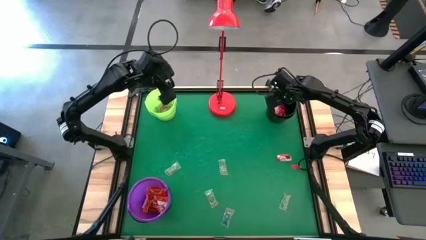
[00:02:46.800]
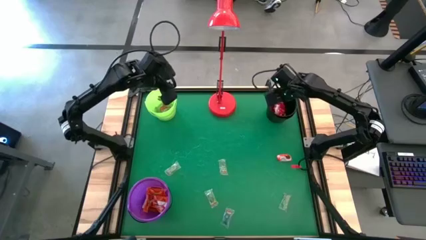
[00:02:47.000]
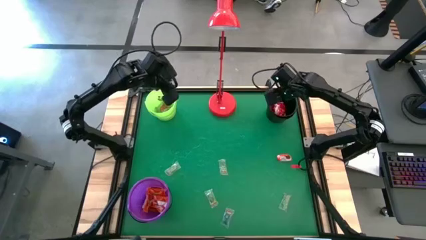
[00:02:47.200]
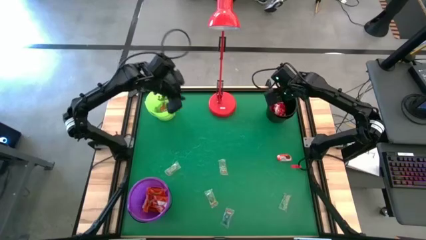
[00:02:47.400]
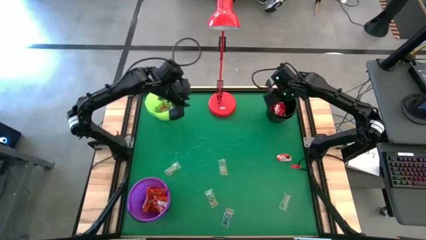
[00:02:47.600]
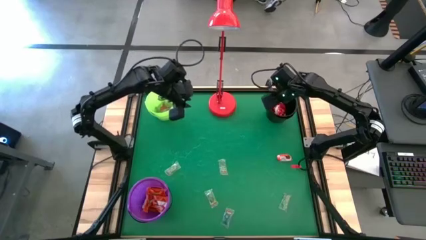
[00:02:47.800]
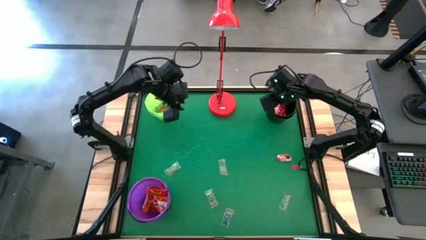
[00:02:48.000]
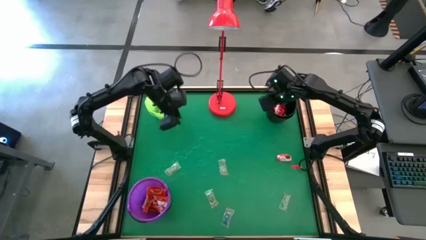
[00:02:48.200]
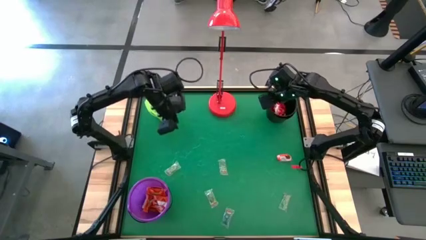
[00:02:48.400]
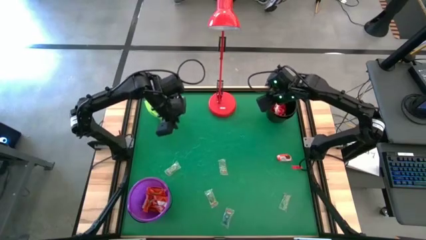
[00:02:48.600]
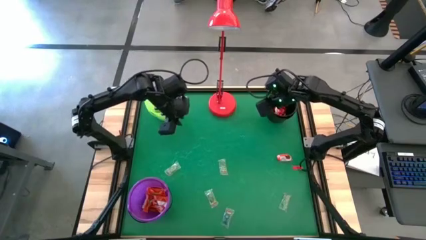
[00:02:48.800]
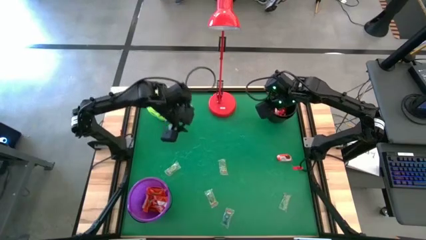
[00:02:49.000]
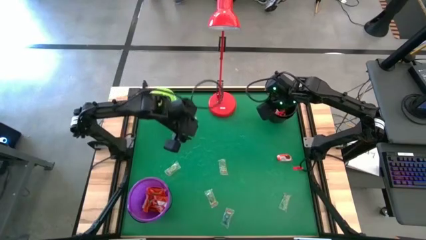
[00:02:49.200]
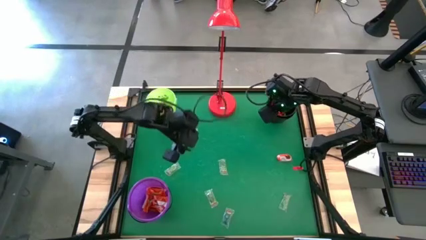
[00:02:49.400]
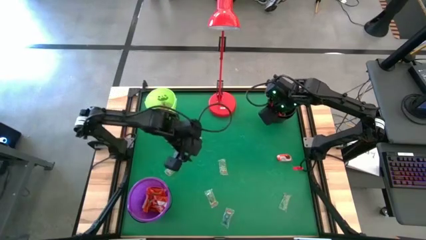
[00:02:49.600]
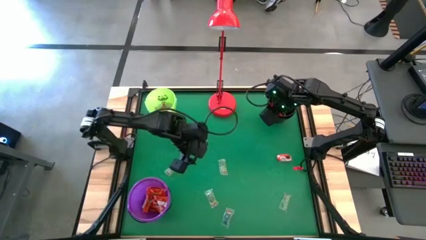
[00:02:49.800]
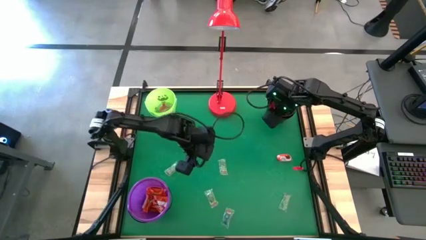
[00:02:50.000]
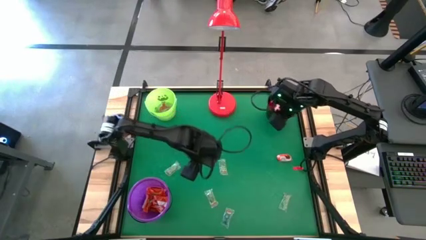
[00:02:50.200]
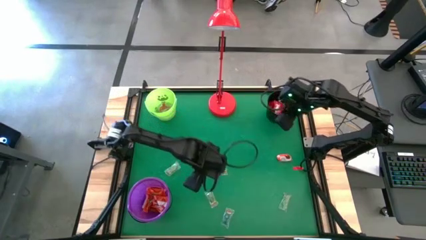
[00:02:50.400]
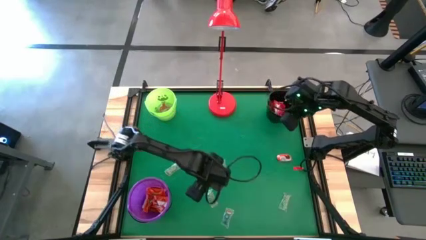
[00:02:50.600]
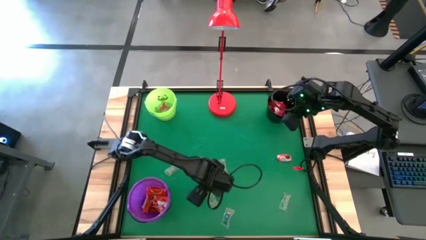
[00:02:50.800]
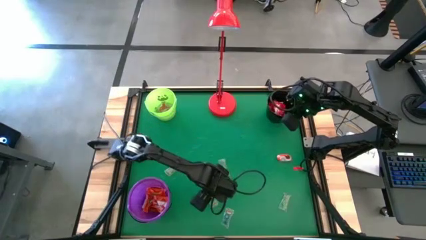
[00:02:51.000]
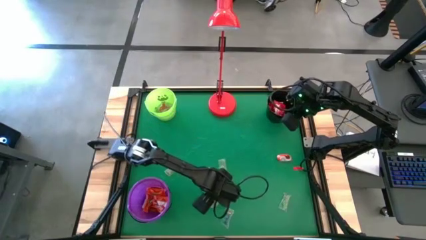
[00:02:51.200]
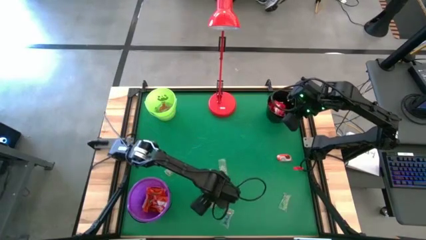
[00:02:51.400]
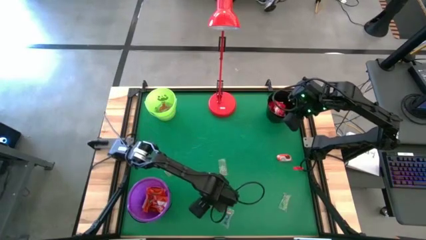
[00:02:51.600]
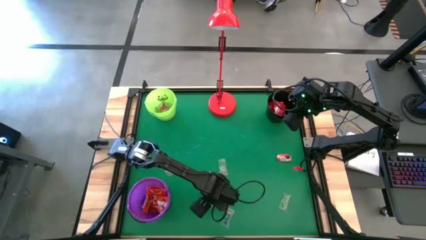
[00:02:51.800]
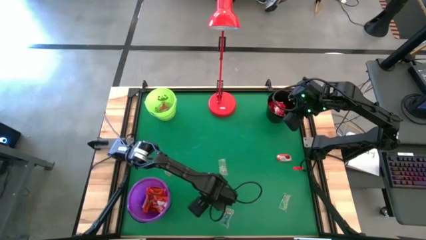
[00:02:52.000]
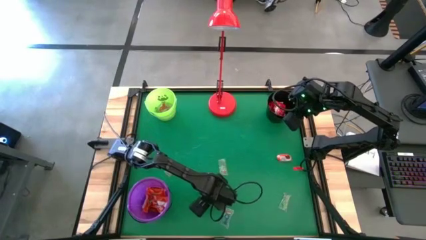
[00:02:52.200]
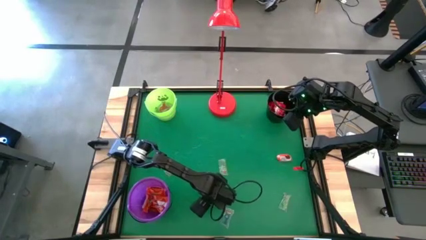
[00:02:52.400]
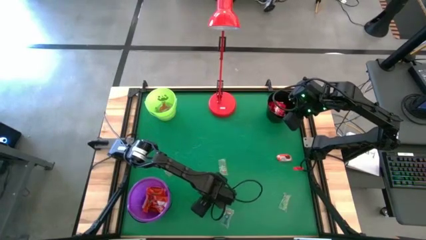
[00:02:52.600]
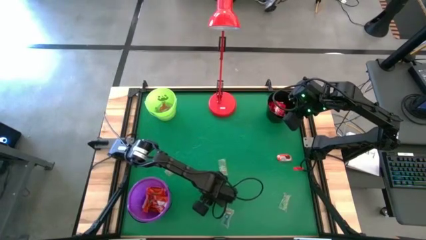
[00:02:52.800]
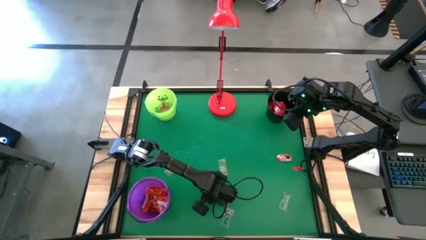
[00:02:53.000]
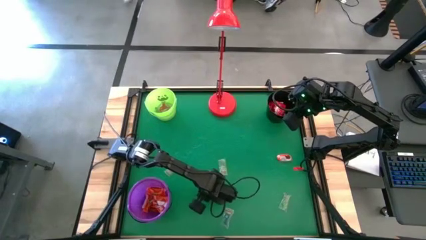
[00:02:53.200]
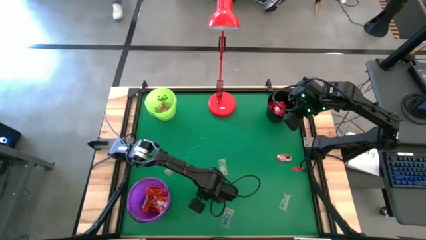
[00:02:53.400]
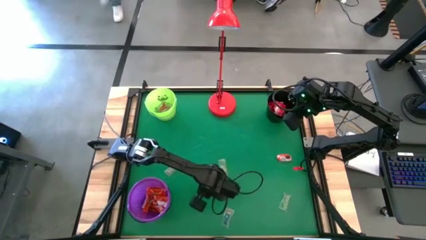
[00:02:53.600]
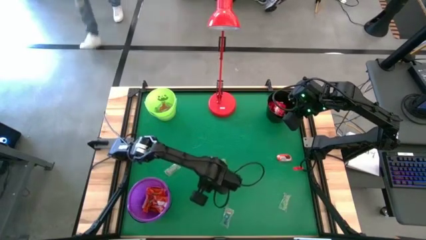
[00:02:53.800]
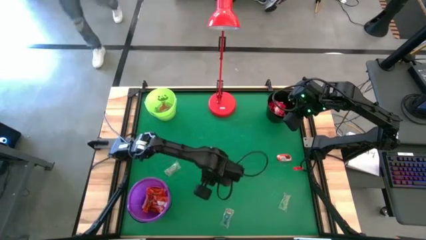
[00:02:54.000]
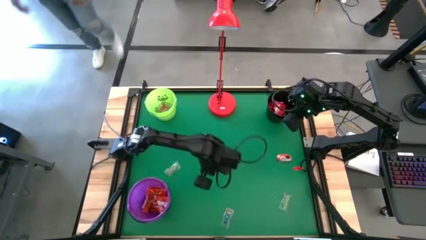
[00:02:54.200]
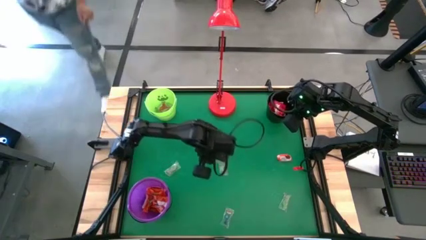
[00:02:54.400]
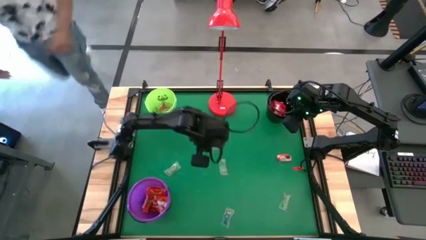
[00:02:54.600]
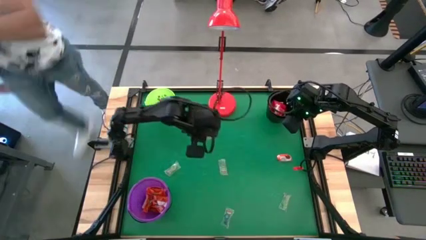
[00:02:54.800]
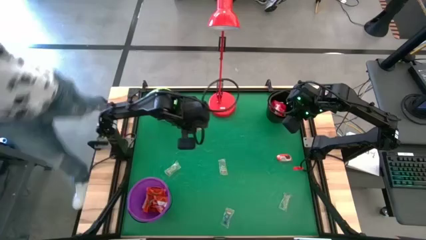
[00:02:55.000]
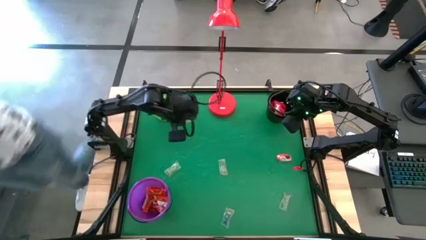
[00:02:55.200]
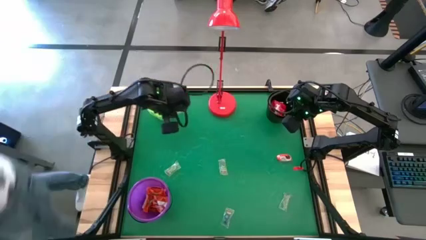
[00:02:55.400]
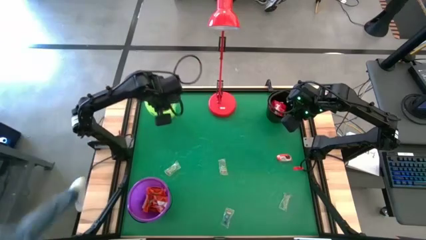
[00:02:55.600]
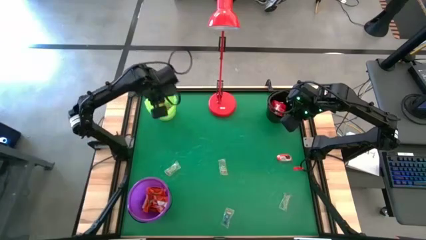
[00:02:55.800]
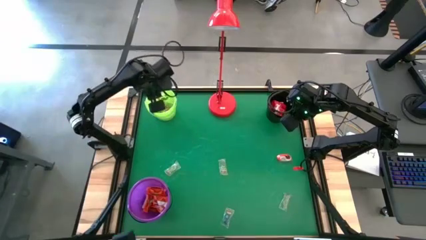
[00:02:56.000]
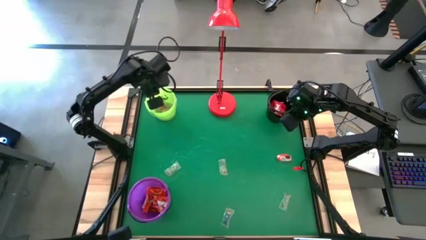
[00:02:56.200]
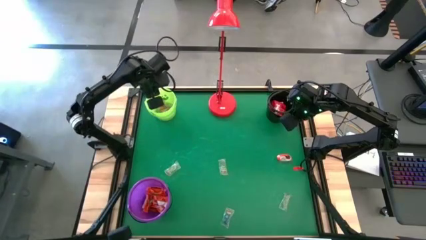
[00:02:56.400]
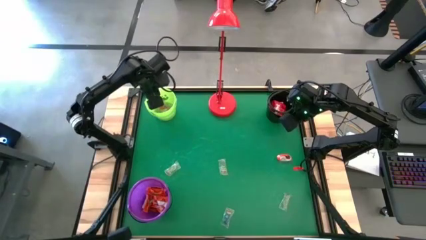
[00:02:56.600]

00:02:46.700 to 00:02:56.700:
Task: Sort candy
Put the transparent candy into the green bucket
